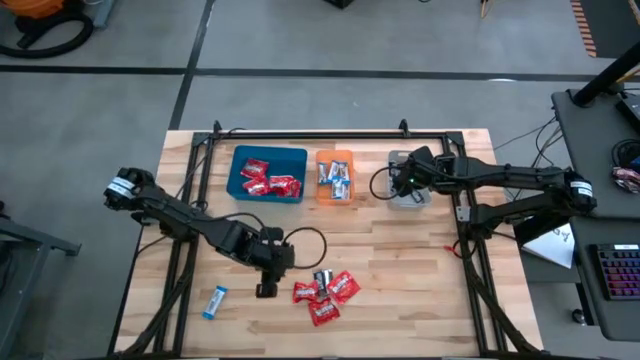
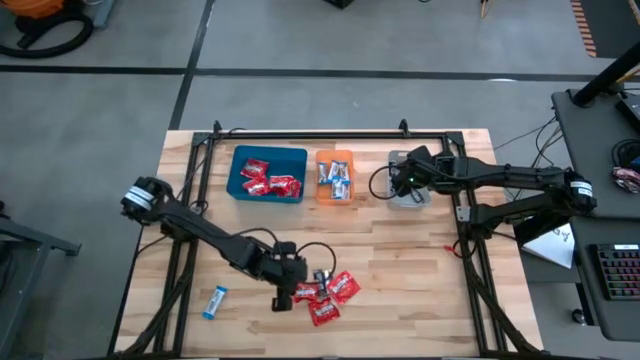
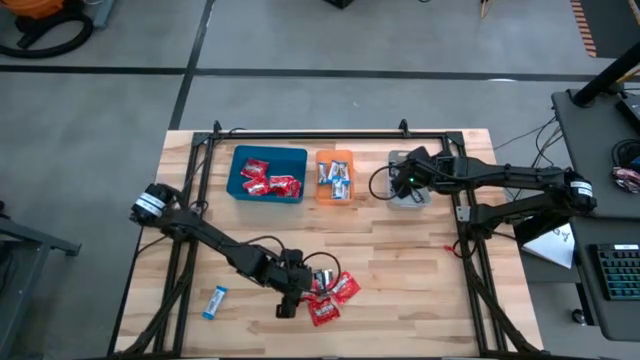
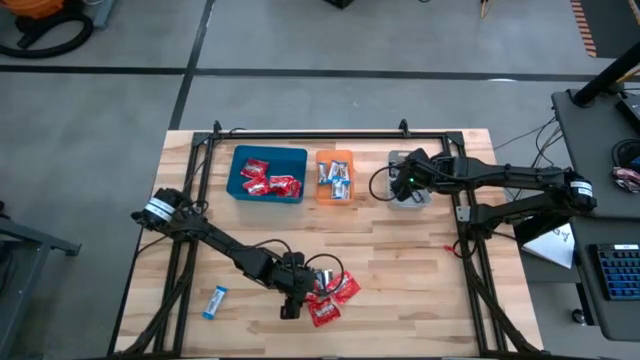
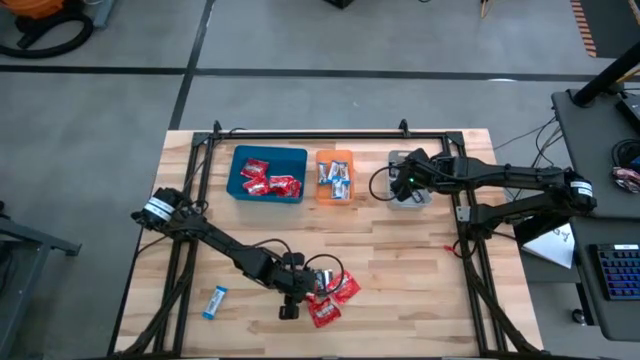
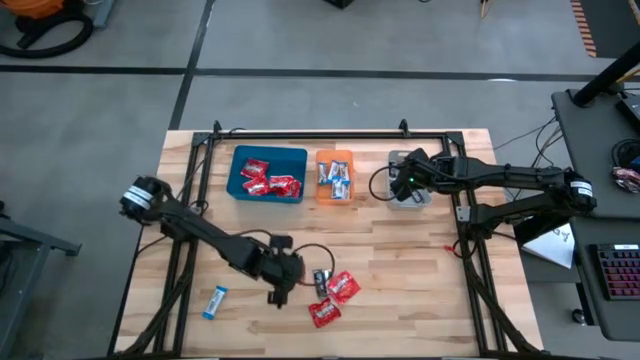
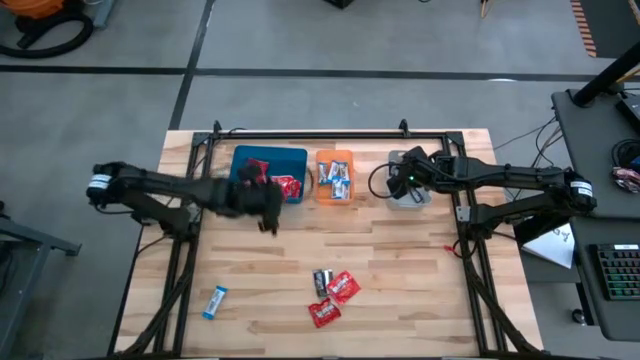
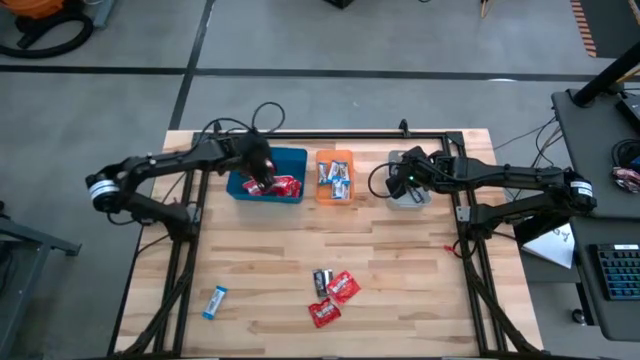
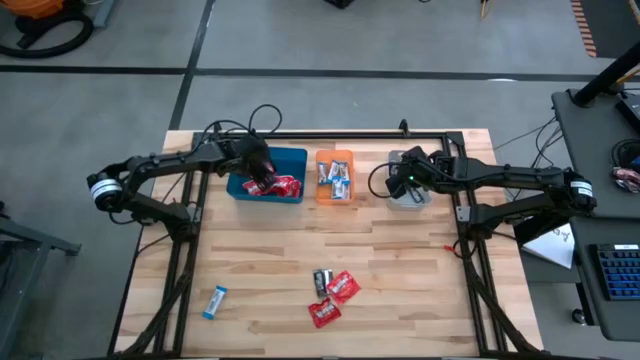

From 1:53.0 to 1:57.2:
Task: Sort candy
Put the red candy into the blue bin

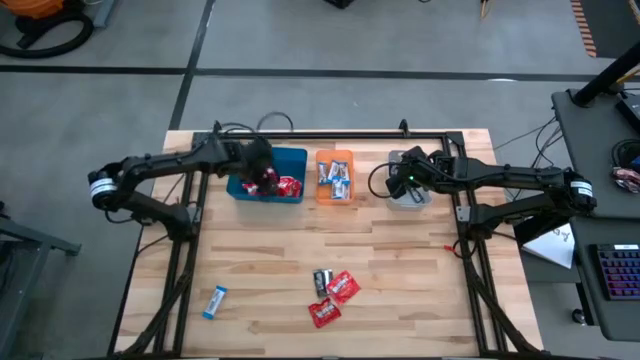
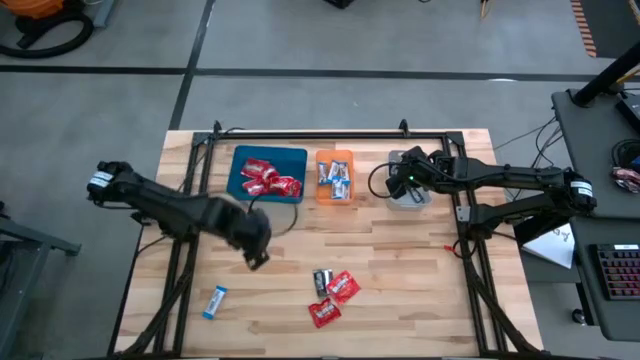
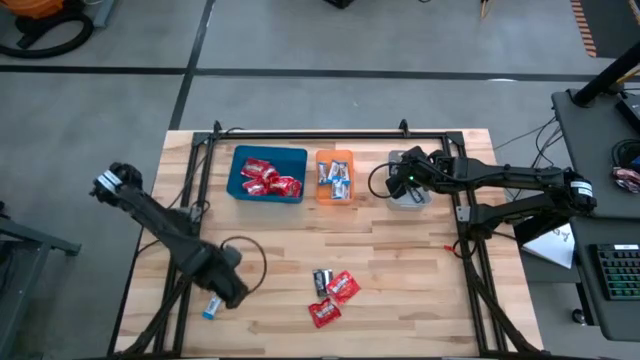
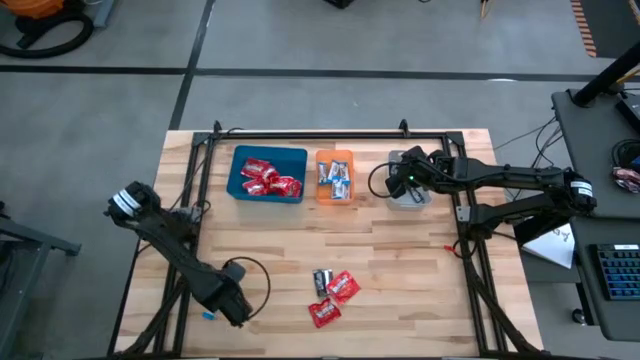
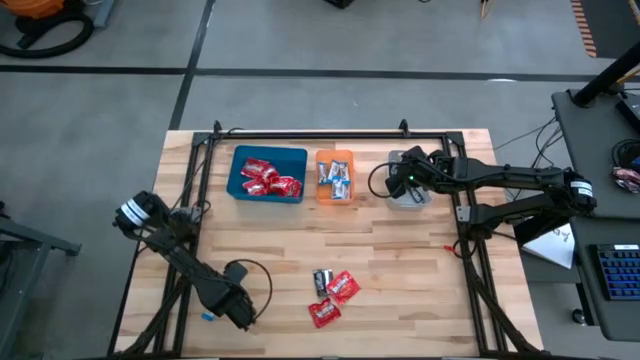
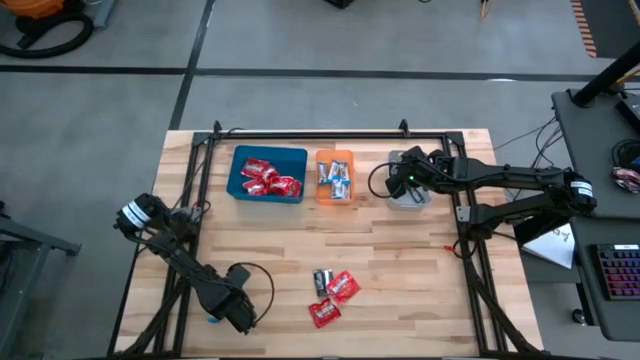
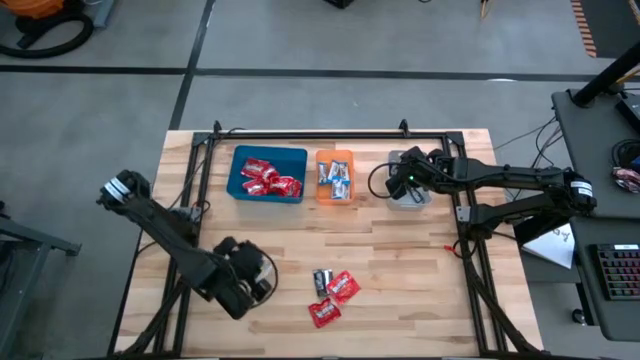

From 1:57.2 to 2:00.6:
Put the white chocolate bar into the orange bin

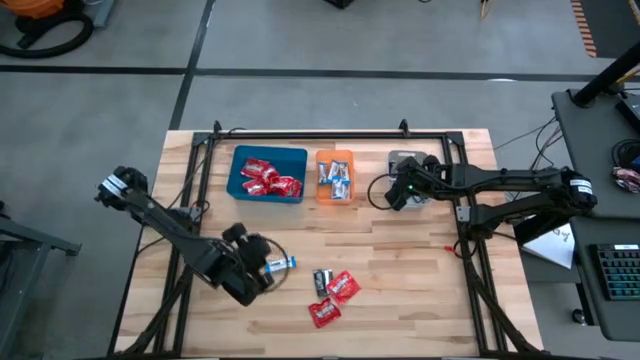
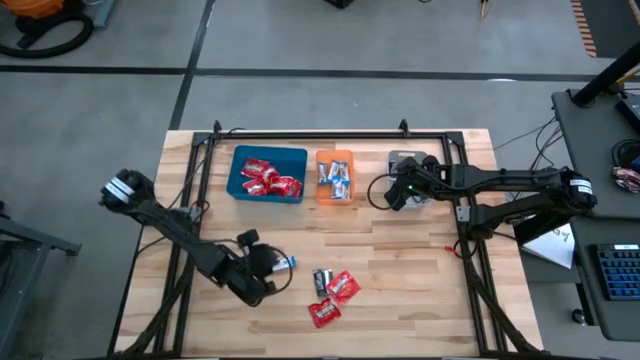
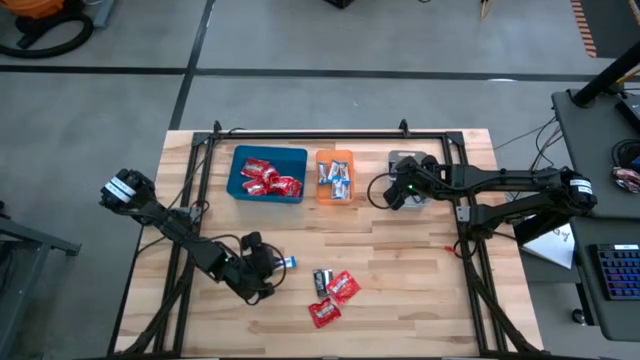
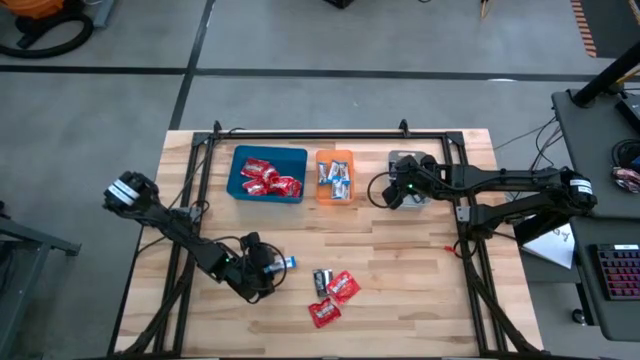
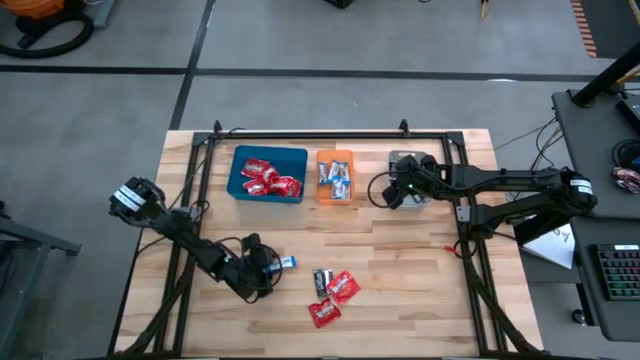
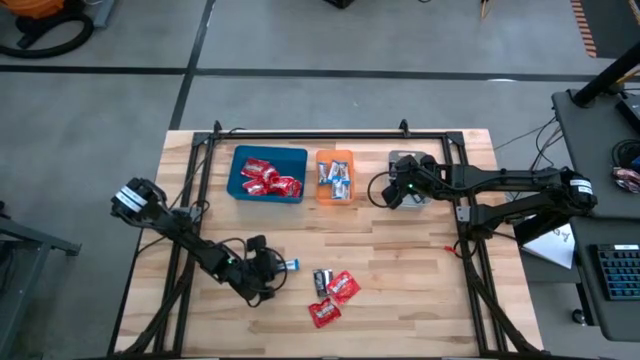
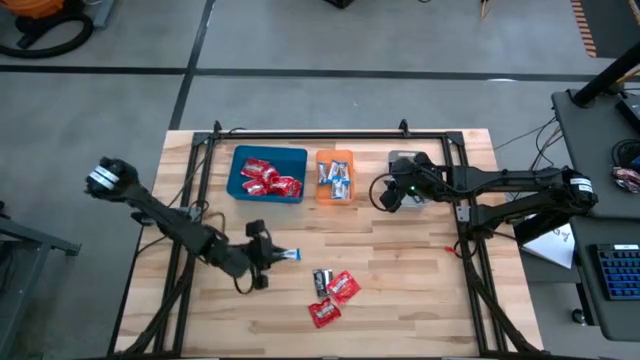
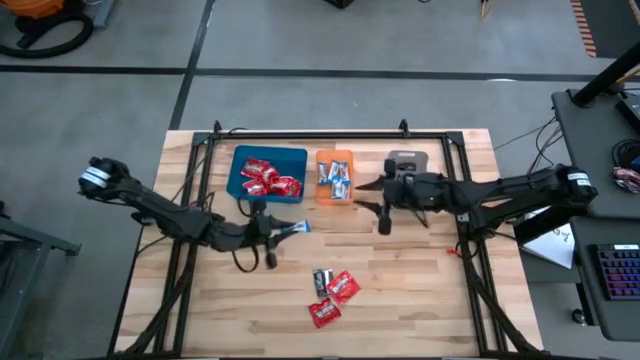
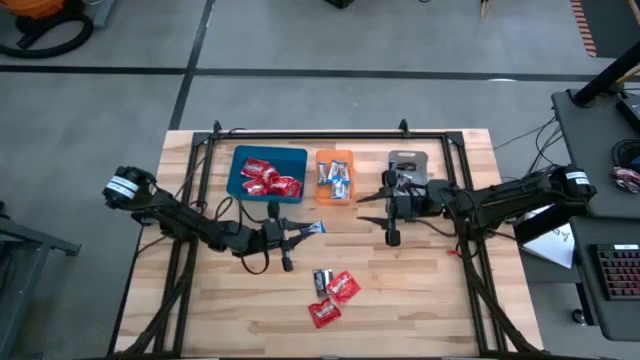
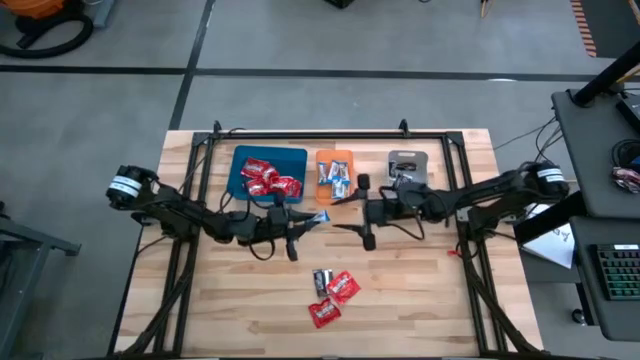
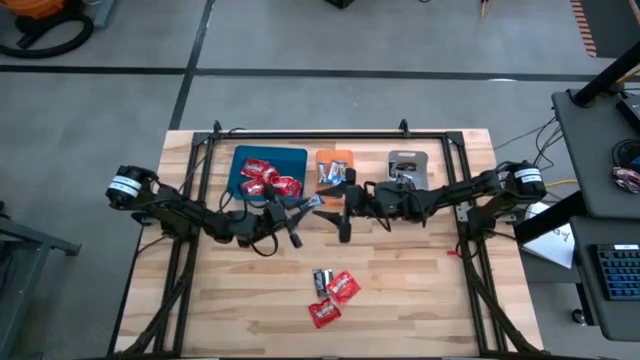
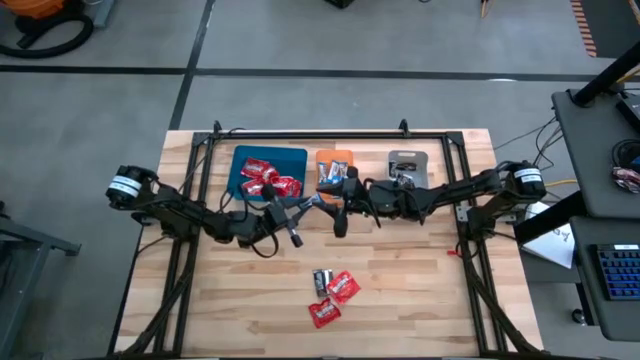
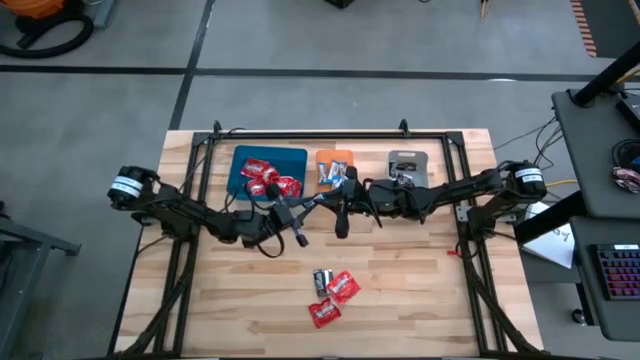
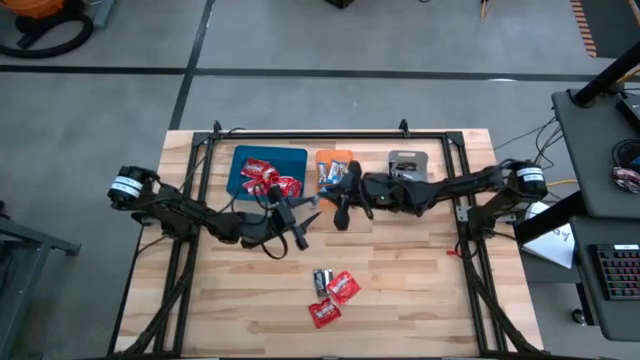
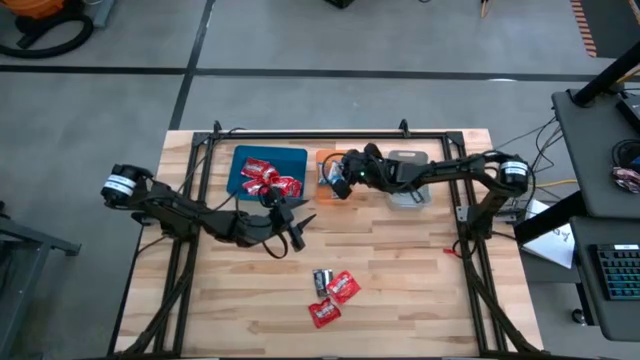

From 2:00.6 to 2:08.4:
Put the white chocolate bar into the orange bin

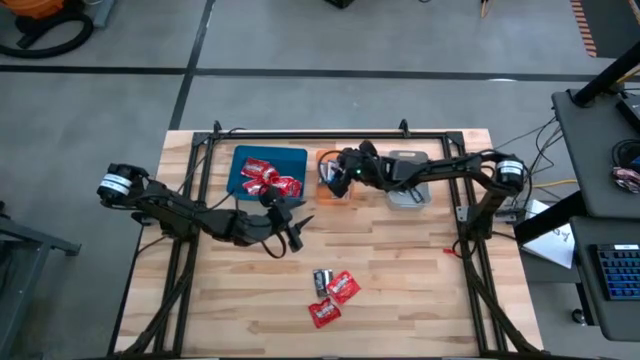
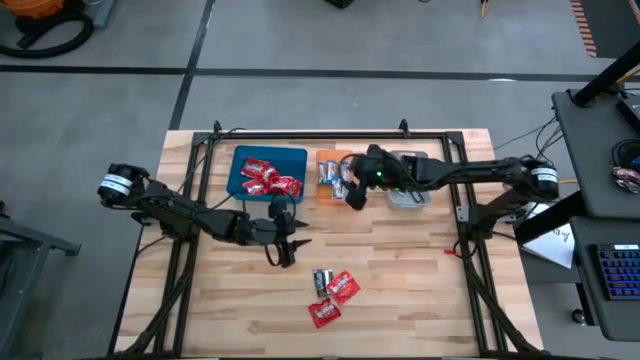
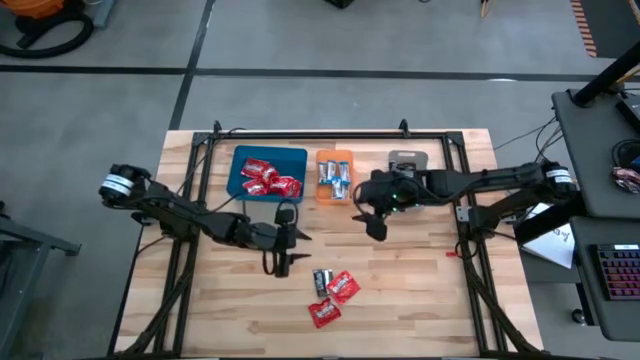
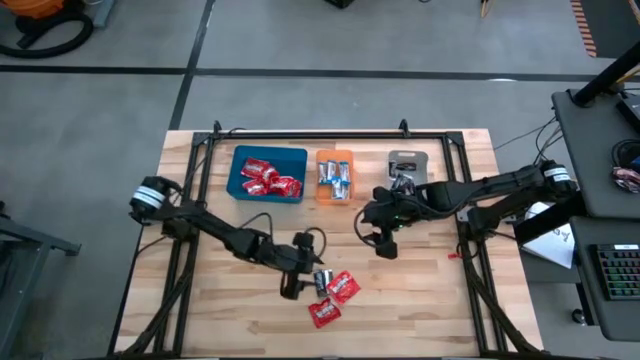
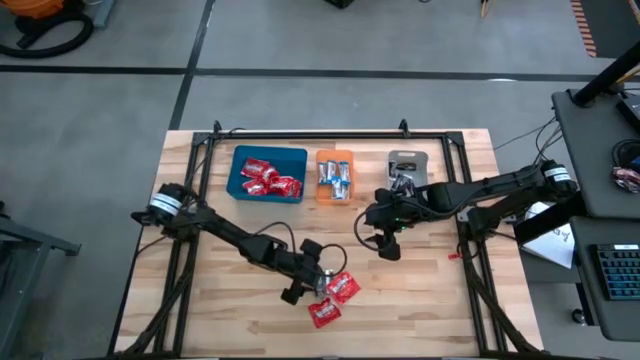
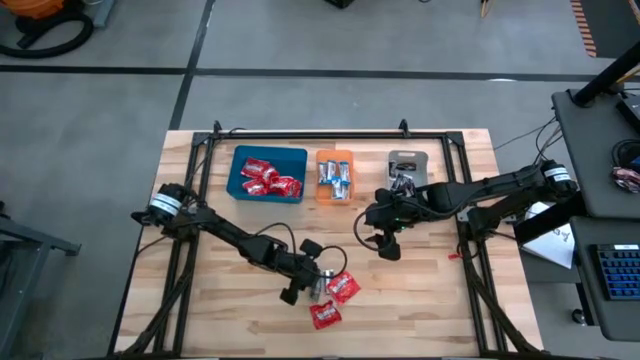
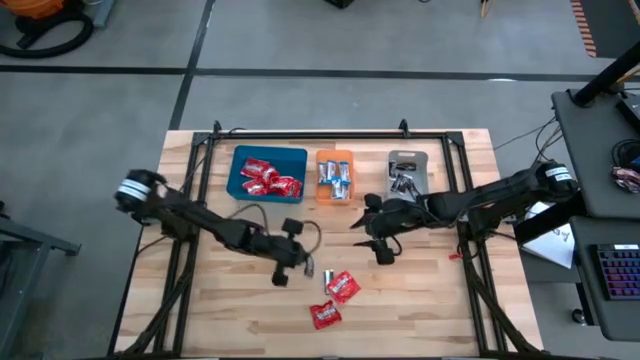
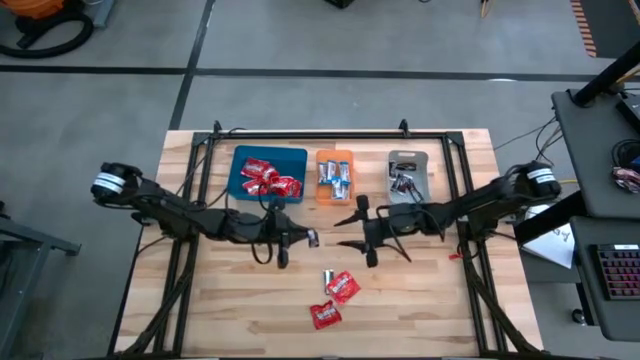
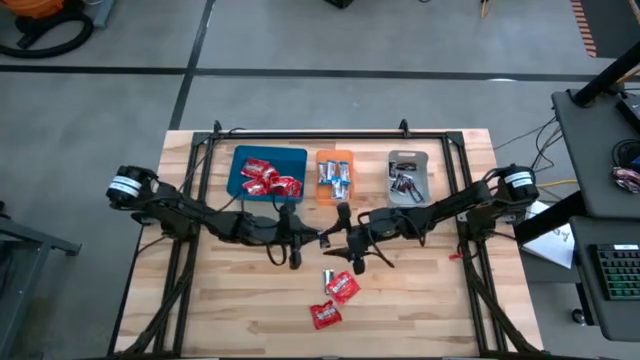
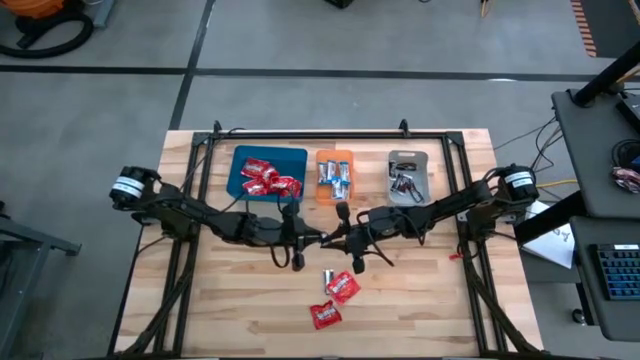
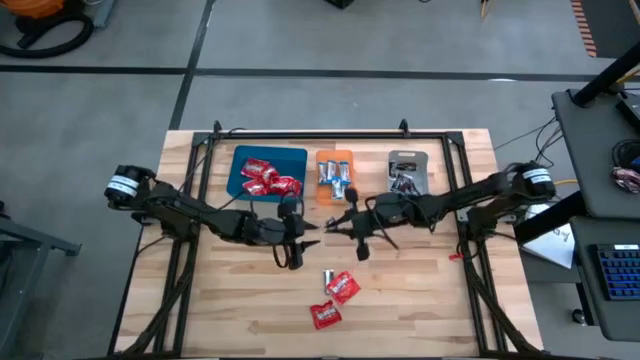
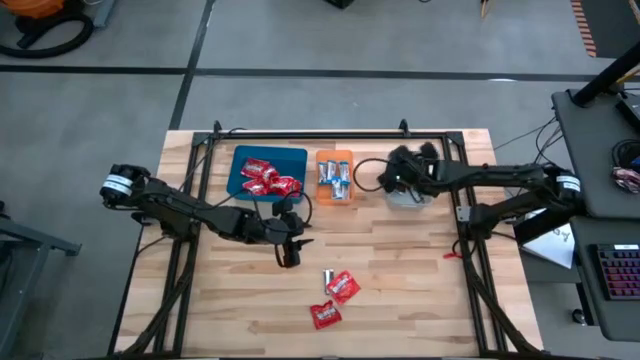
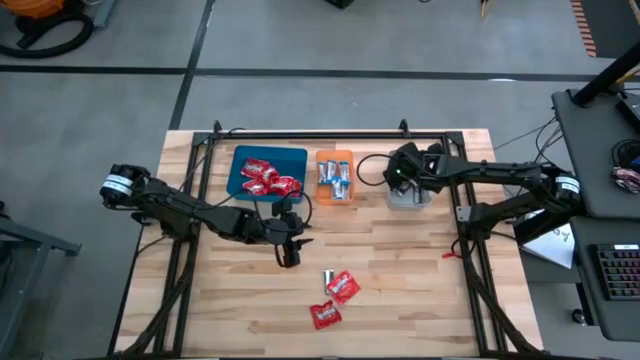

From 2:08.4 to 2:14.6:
Put the brown chocolate bar into the gray bin
